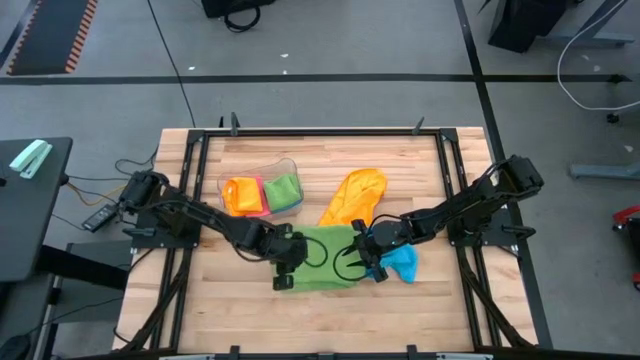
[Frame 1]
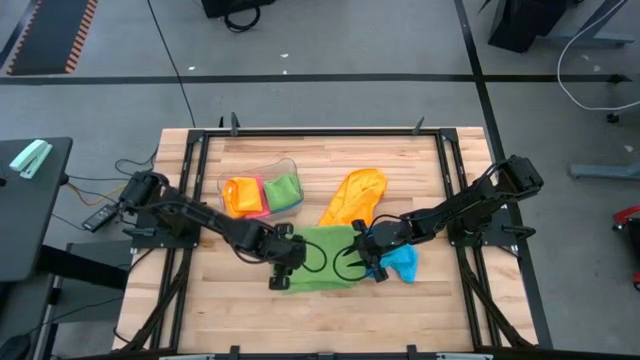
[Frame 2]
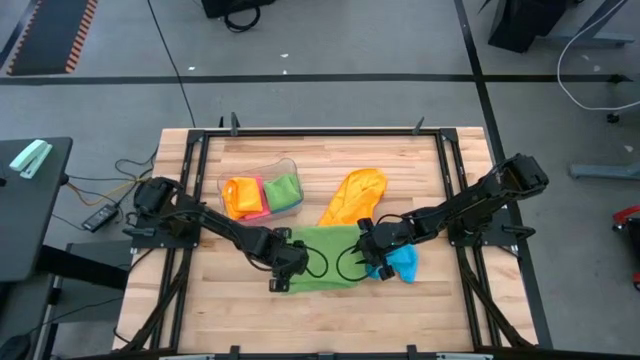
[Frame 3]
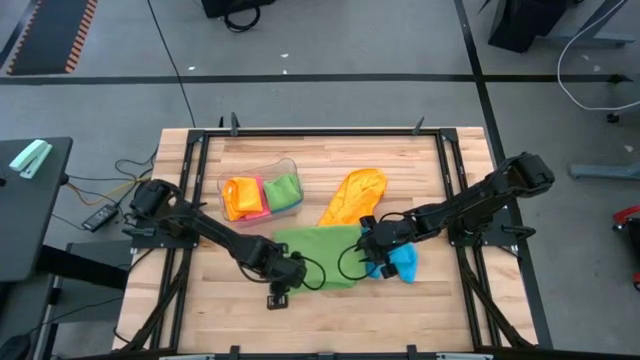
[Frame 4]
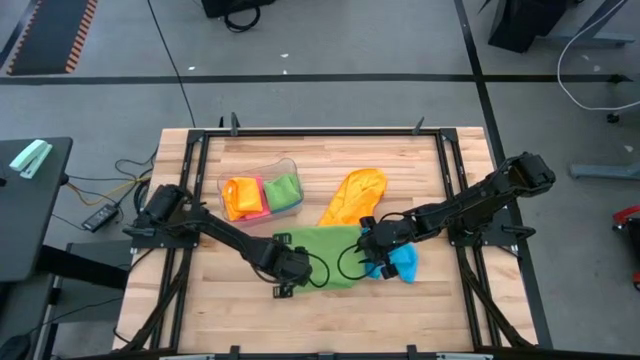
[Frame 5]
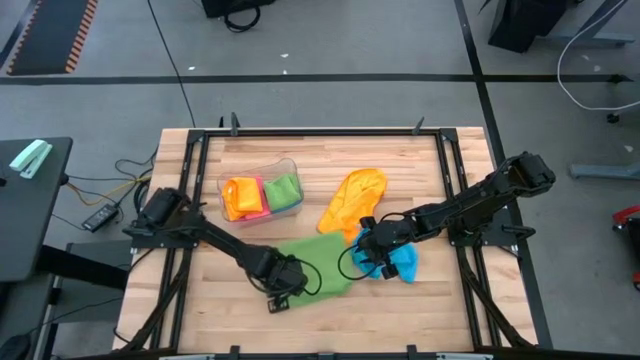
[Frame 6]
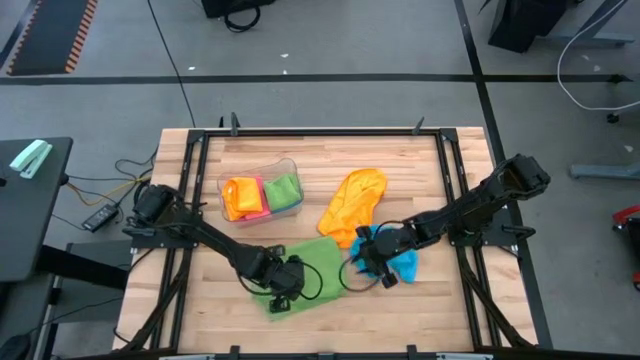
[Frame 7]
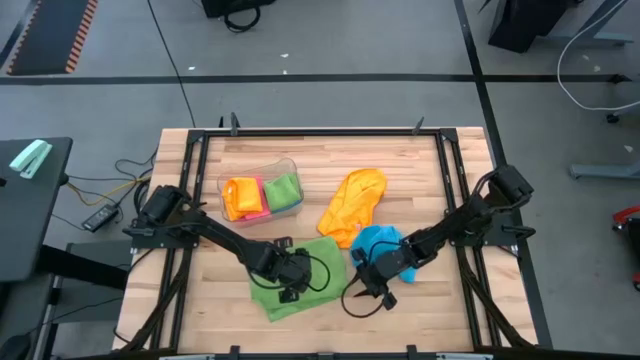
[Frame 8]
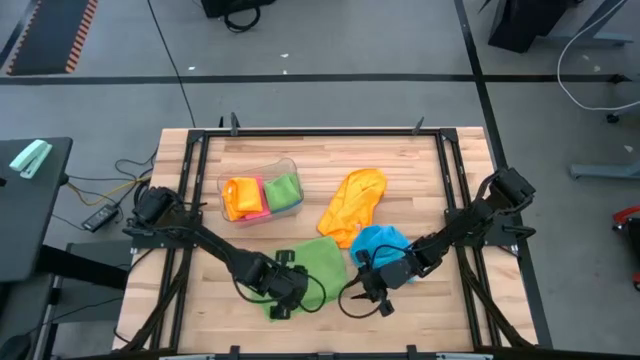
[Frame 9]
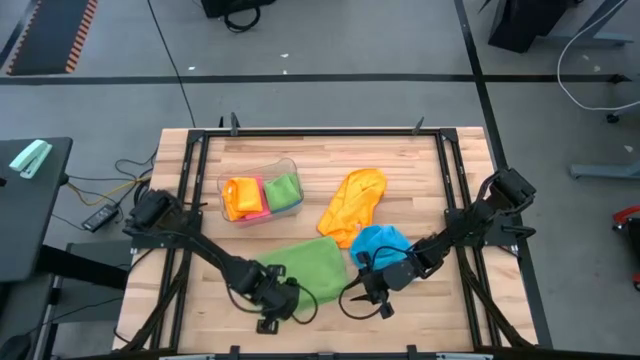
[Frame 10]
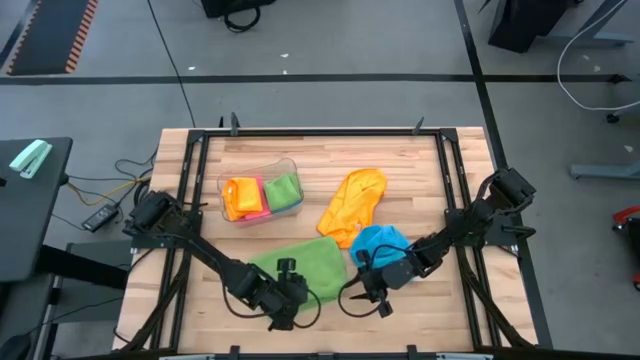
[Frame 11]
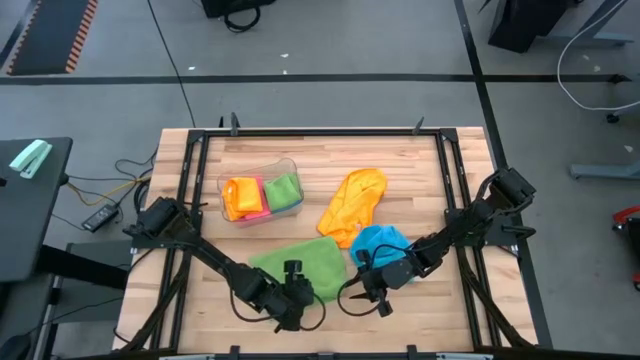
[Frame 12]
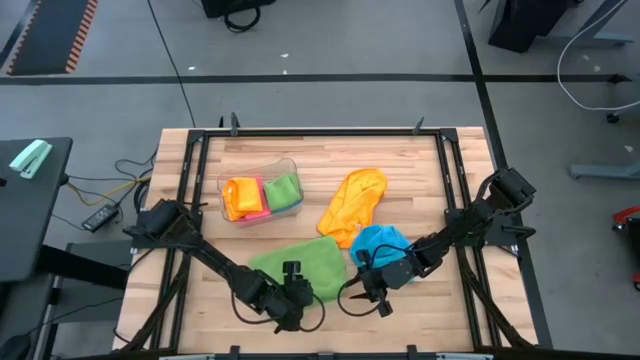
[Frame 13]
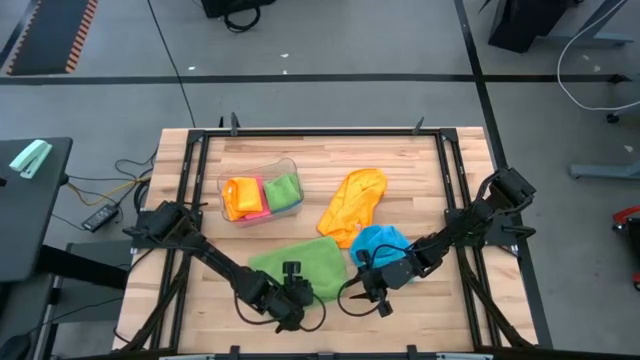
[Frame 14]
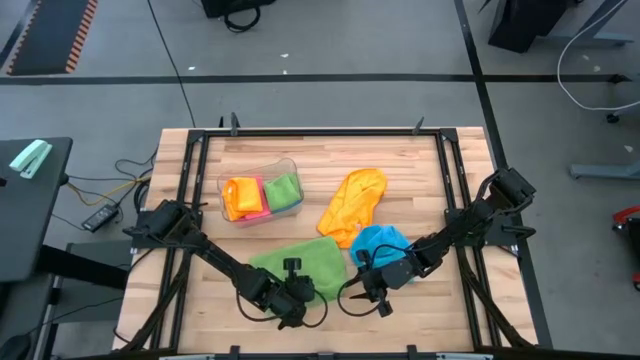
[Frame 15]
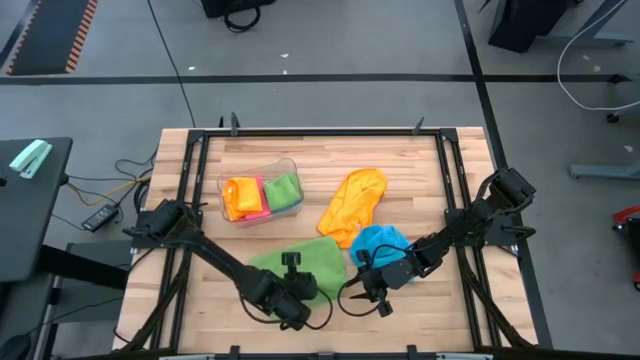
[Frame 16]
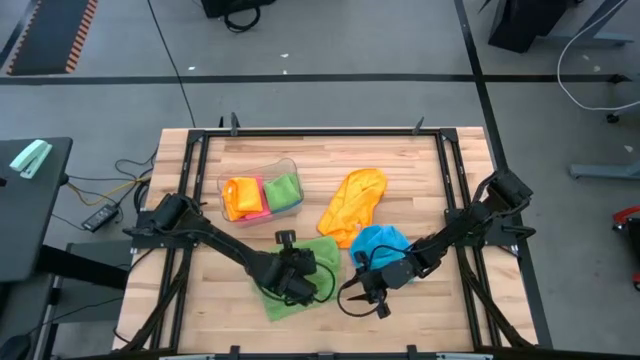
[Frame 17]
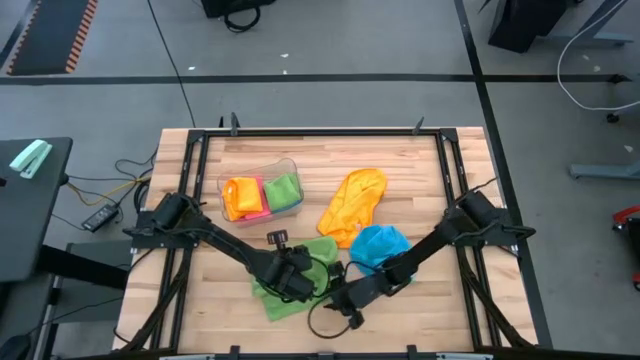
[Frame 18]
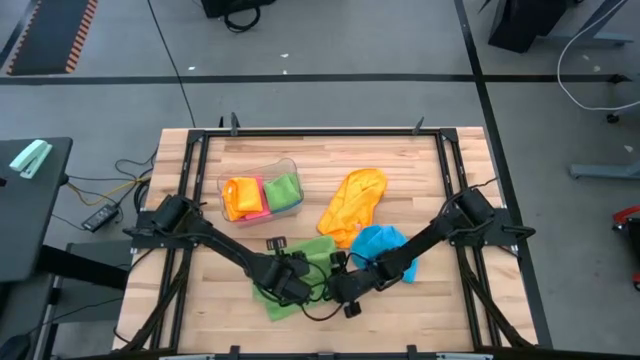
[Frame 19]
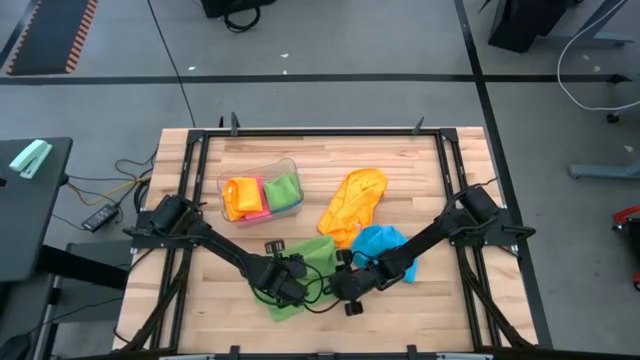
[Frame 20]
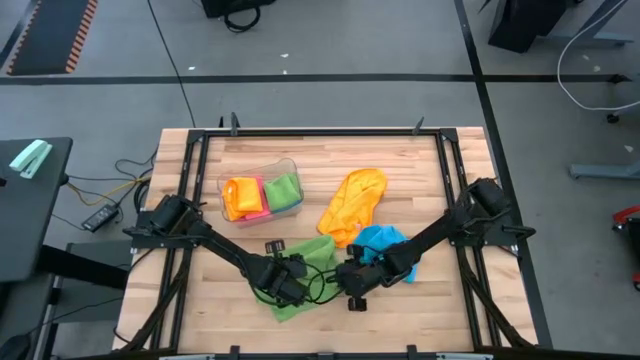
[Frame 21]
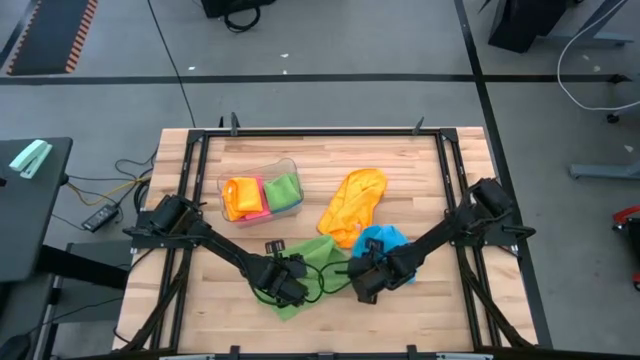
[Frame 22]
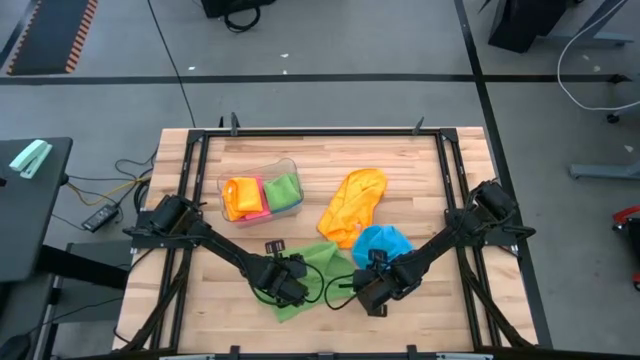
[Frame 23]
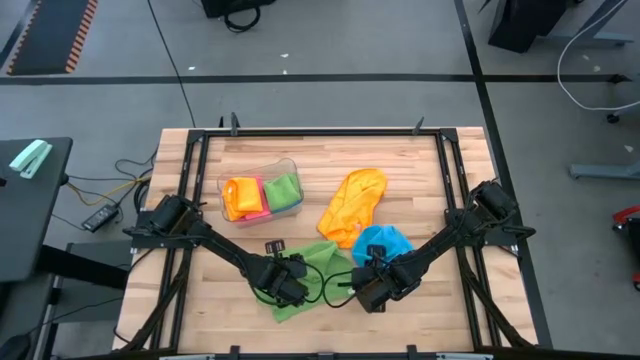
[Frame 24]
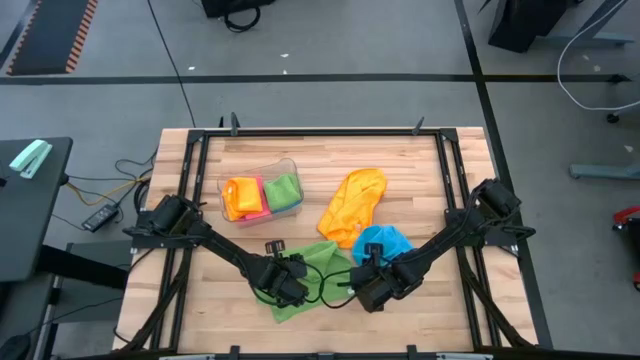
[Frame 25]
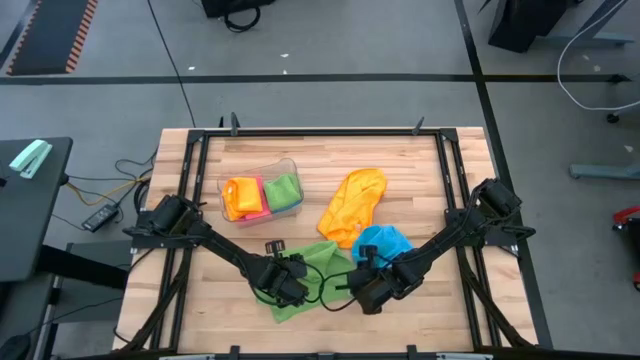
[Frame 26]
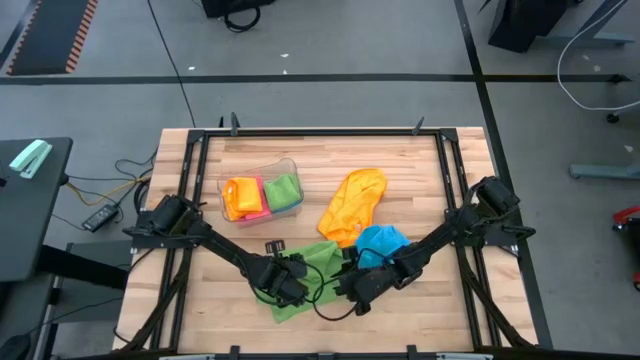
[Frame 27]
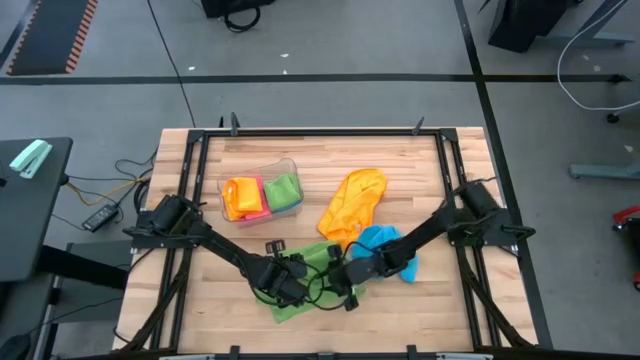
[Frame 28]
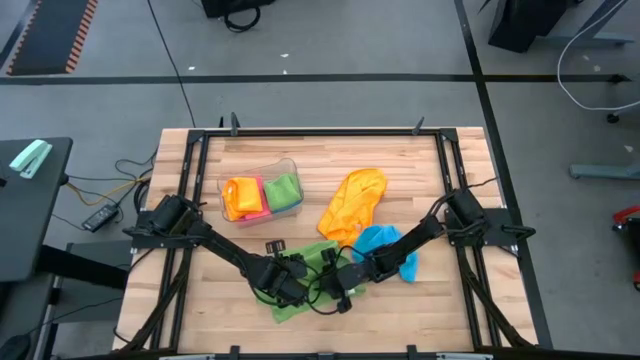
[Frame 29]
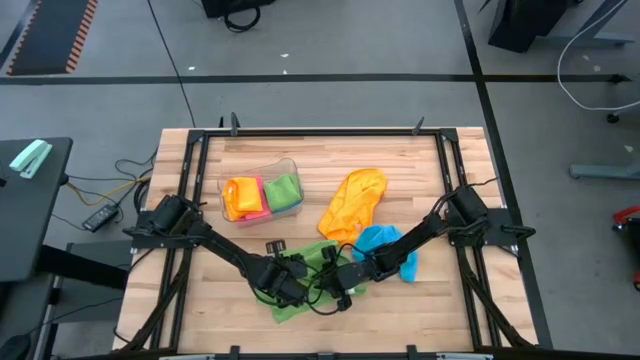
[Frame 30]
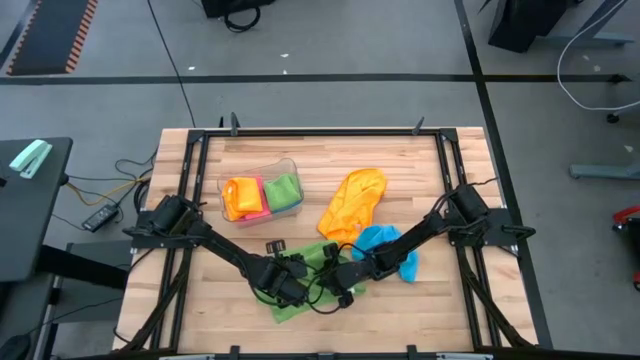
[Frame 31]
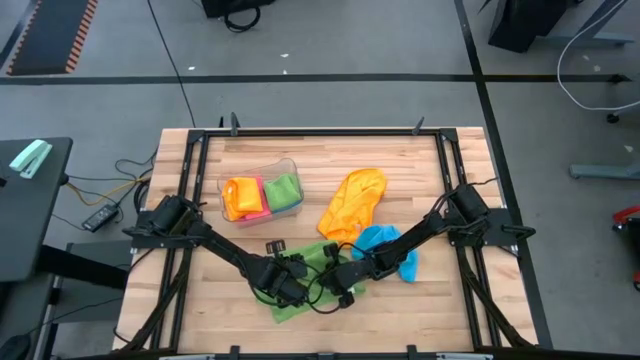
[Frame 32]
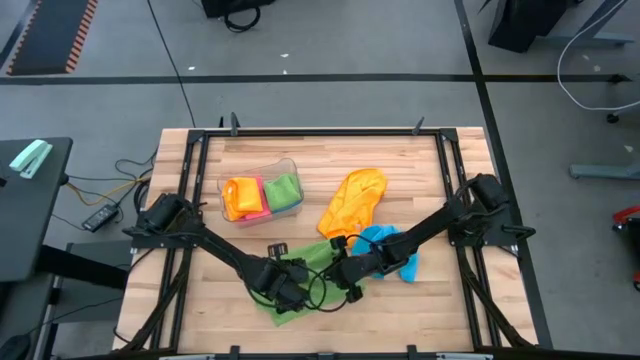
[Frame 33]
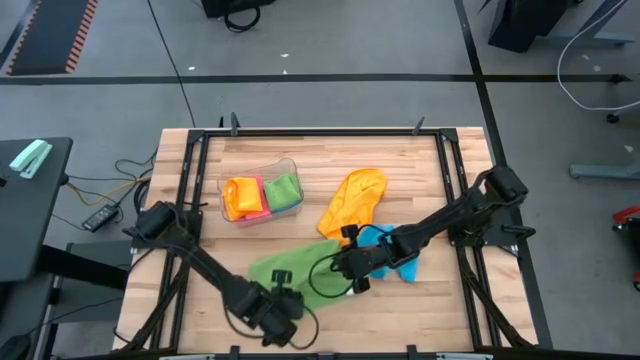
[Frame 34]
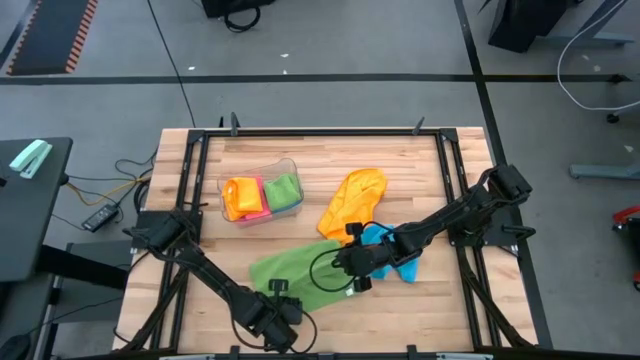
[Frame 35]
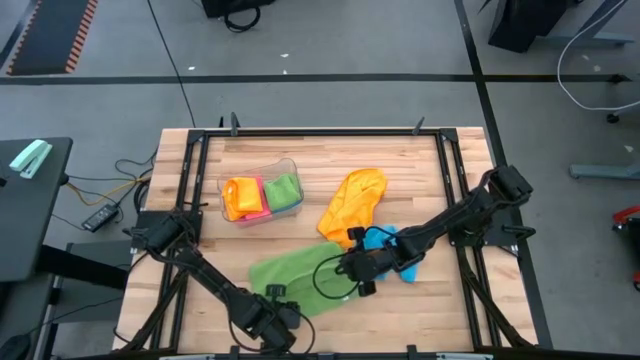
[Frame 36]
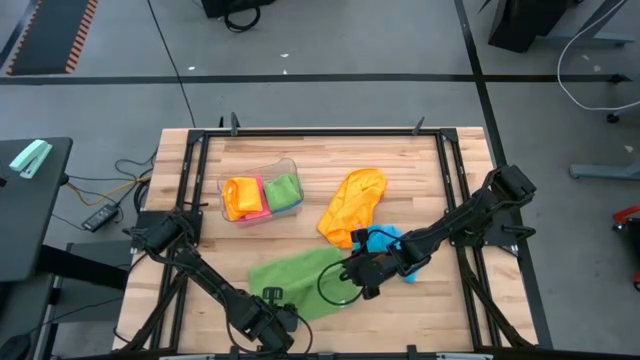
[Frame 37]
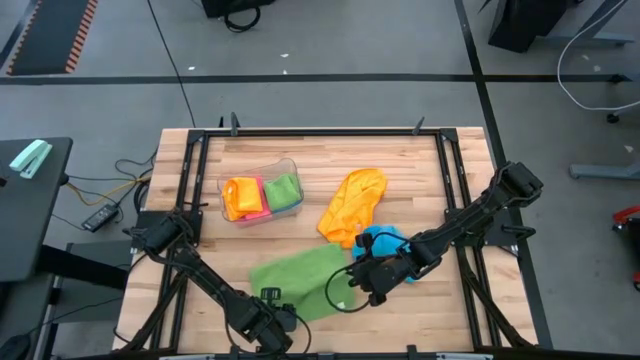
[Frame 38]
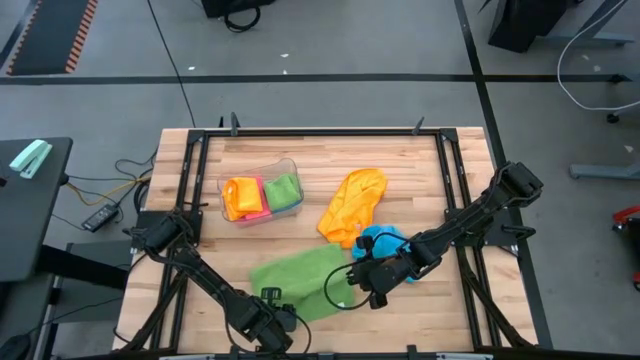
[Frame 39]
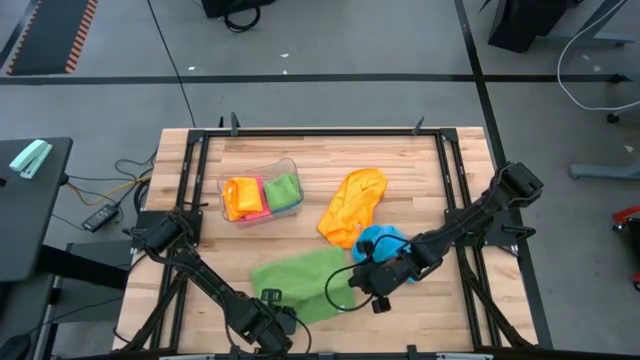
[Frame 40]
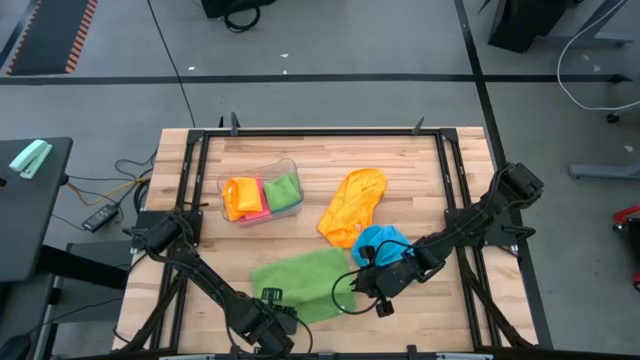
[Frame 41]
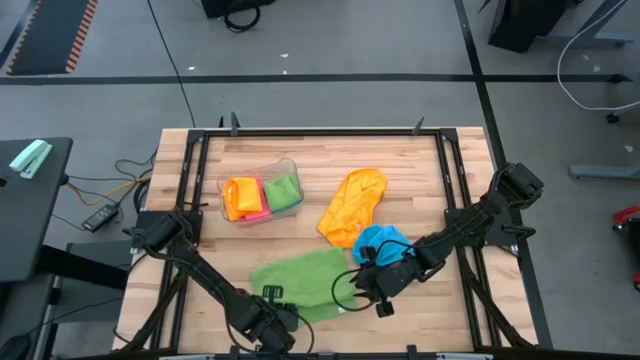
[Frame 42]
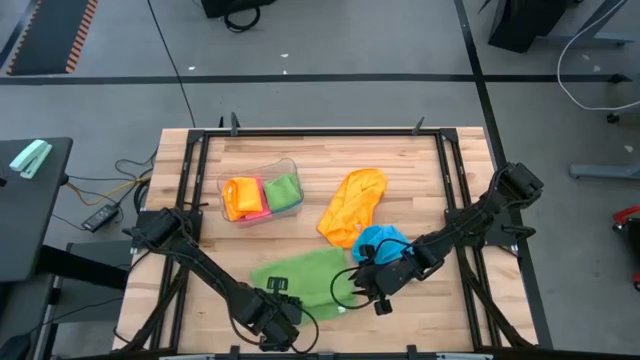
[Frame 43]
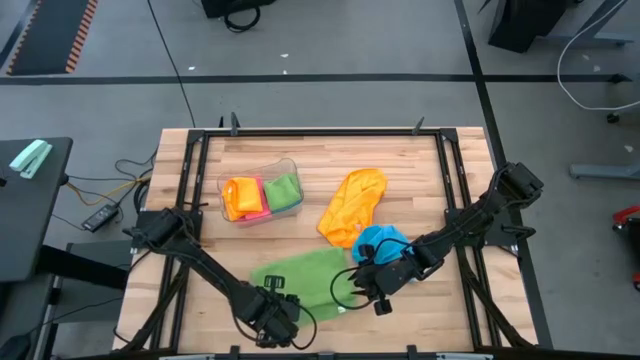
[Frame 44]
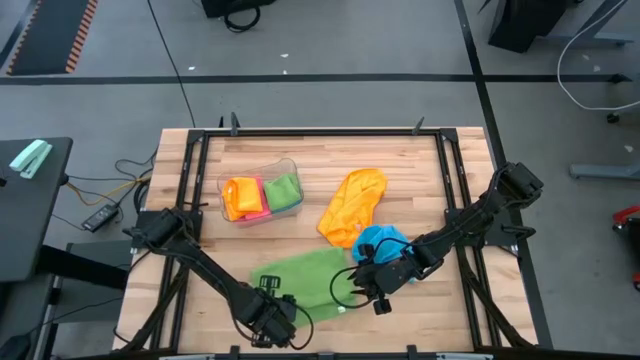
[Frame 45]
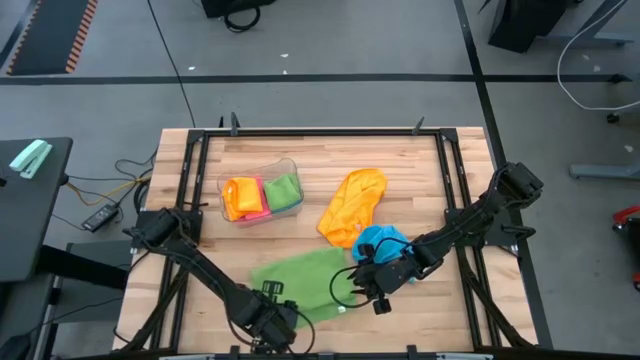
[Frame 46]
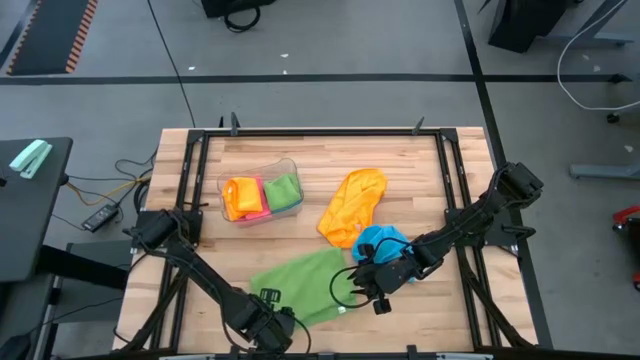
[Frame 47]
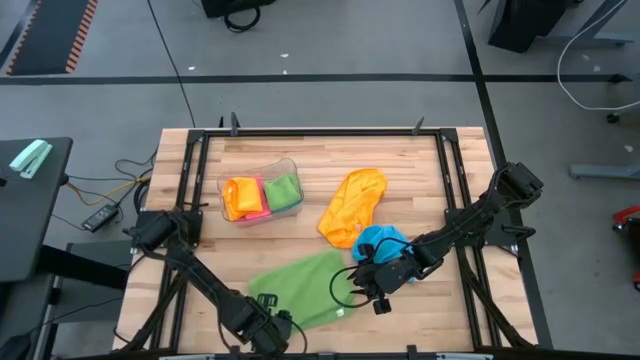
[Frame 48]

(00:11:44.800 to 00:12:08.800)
Task: Fold microfiber towels
Fold the green microfiber towel
